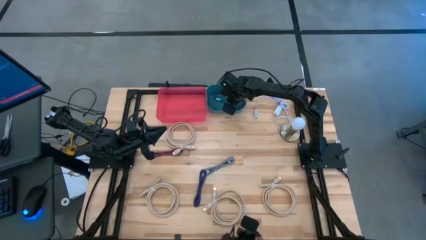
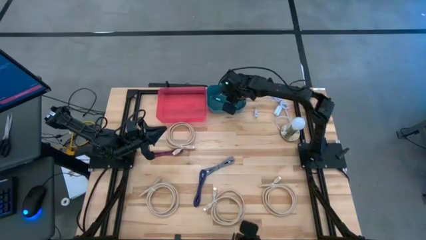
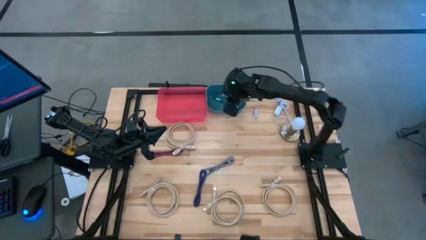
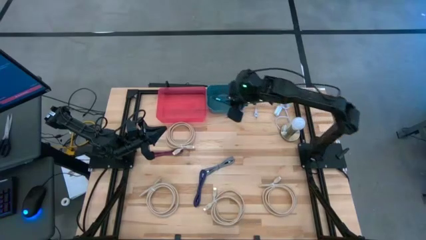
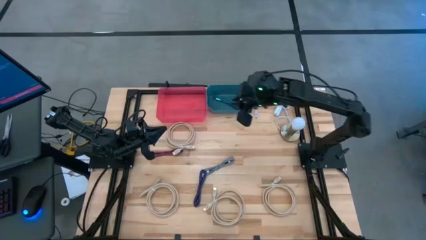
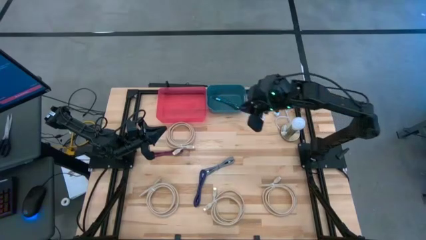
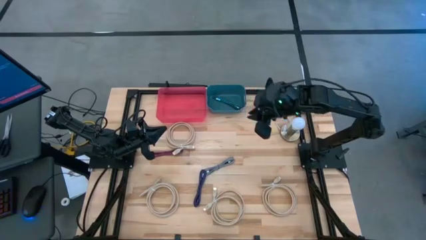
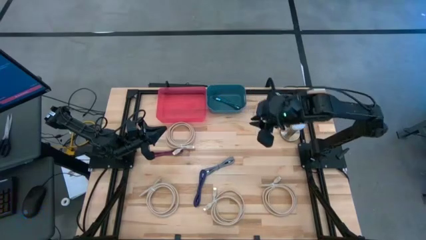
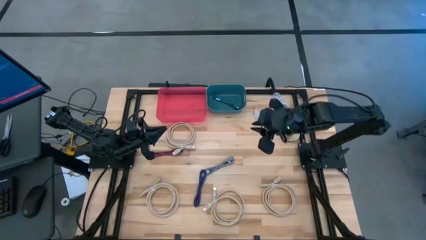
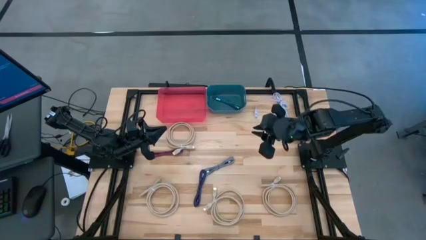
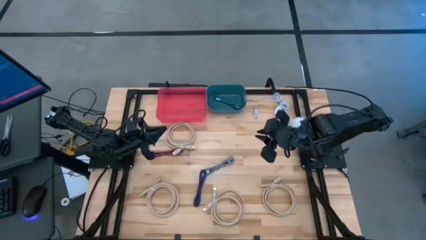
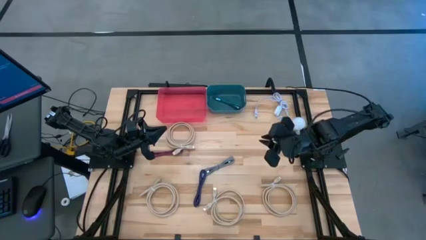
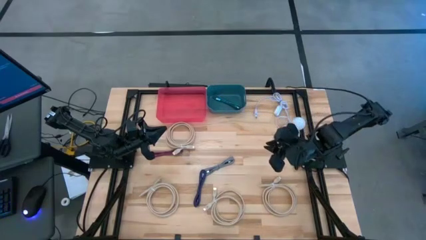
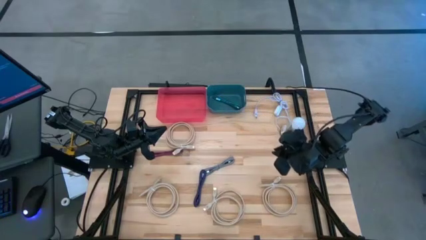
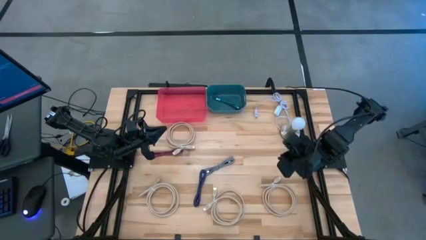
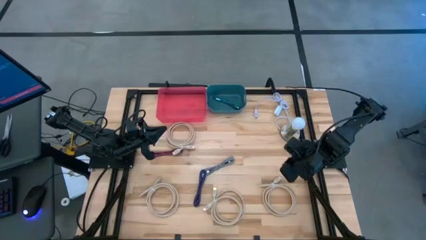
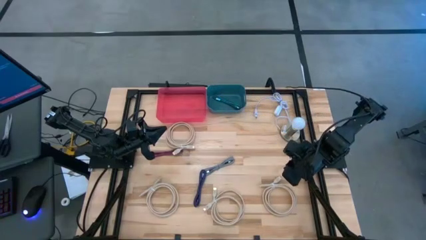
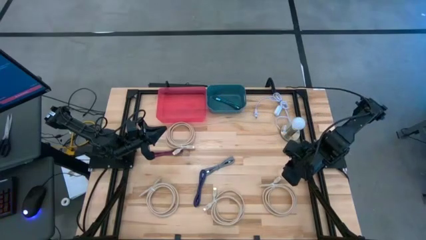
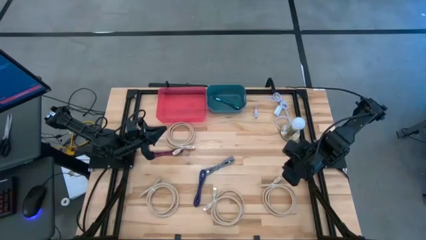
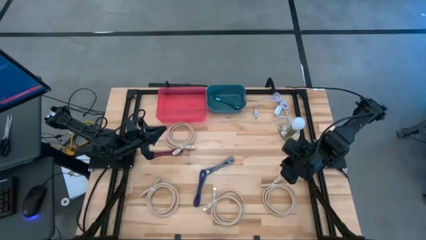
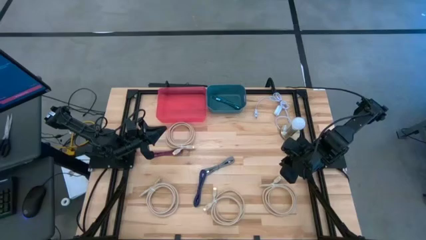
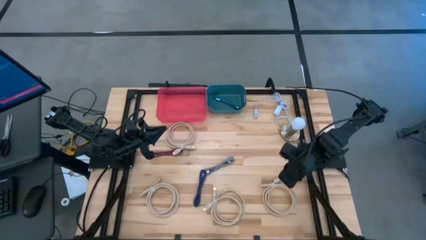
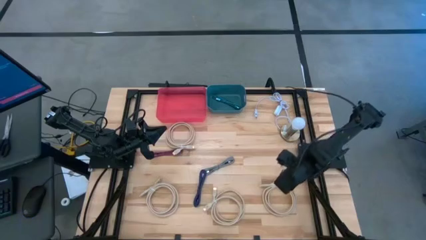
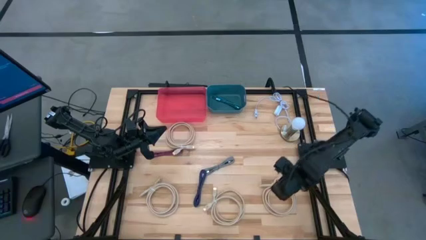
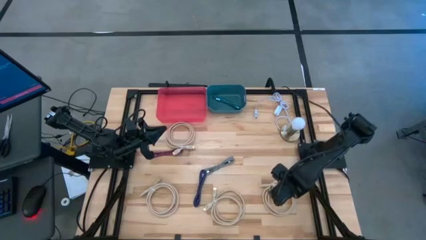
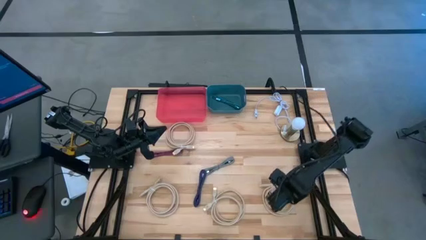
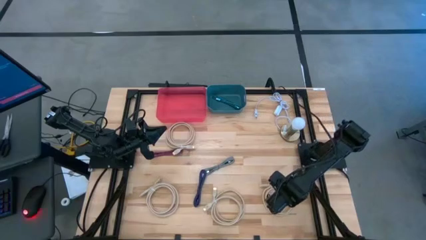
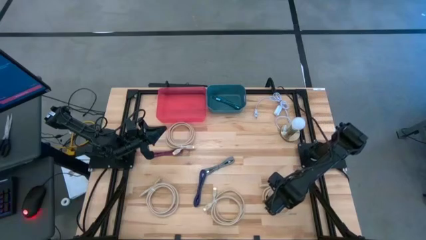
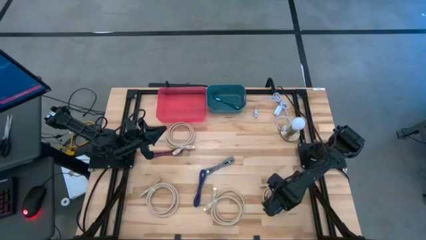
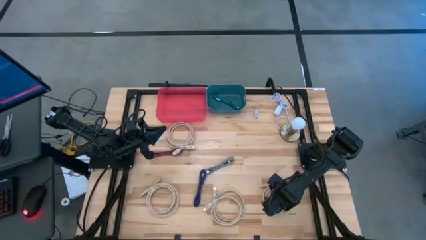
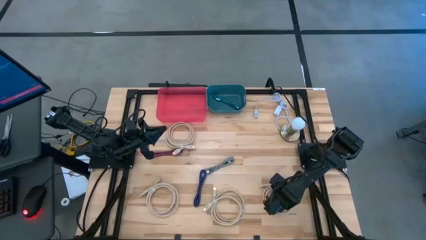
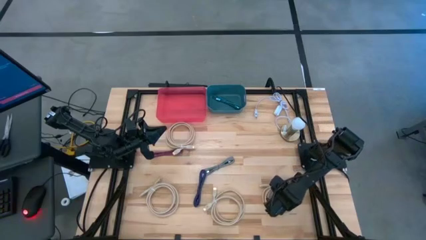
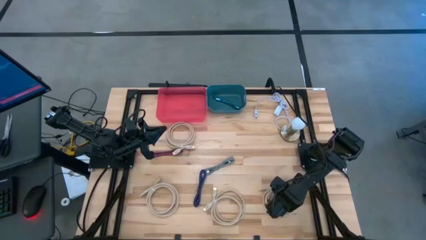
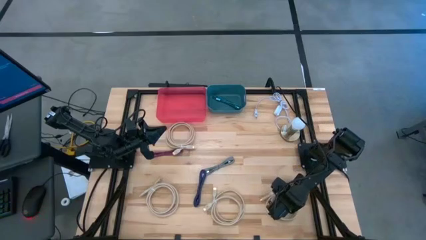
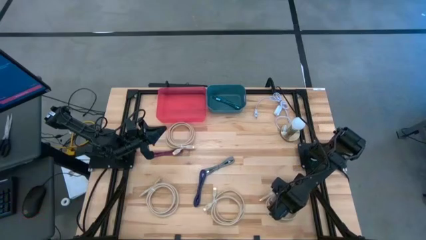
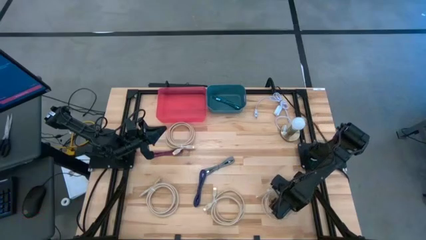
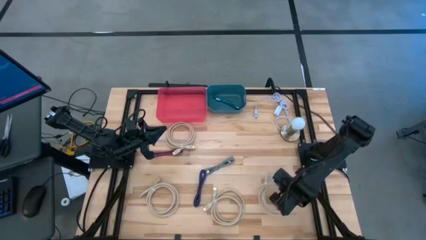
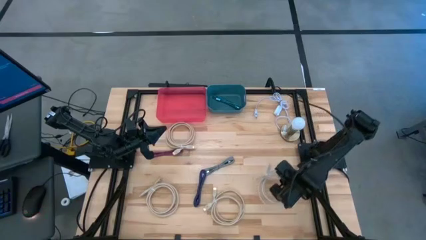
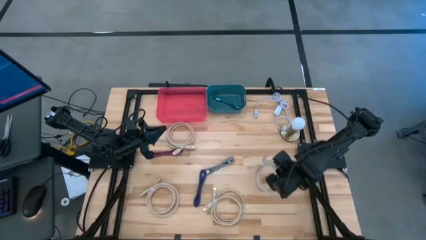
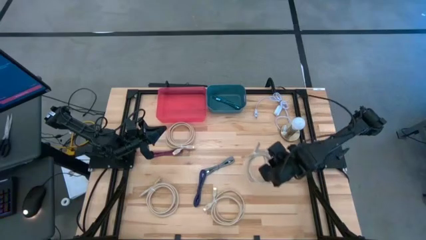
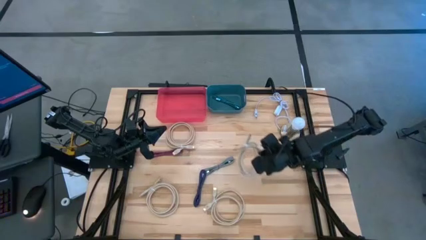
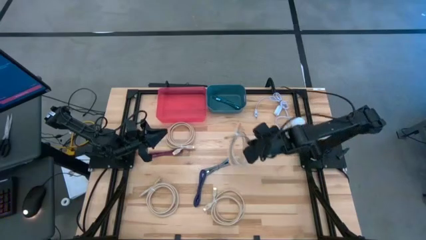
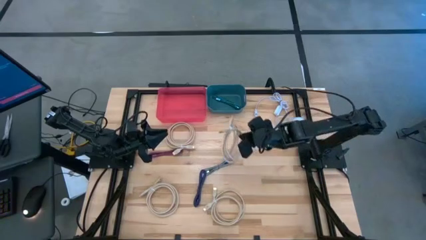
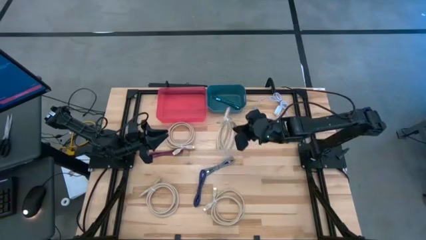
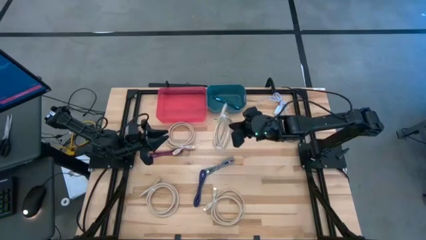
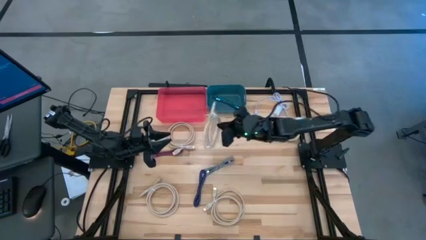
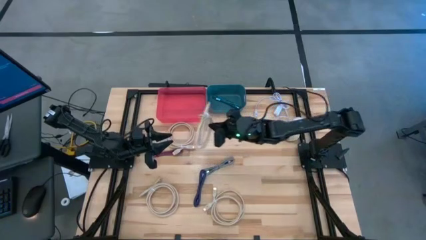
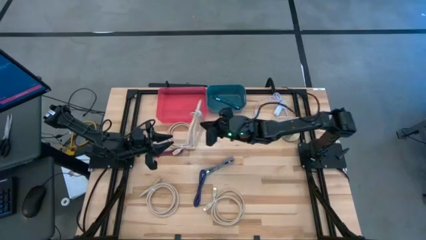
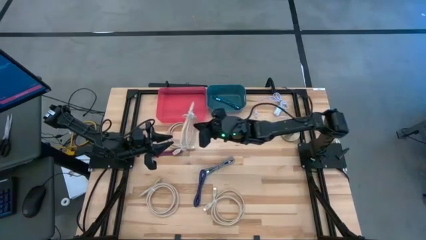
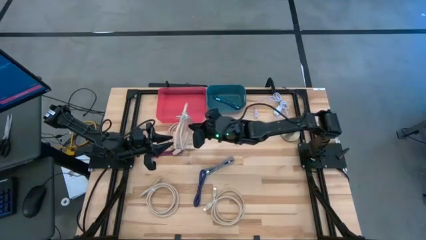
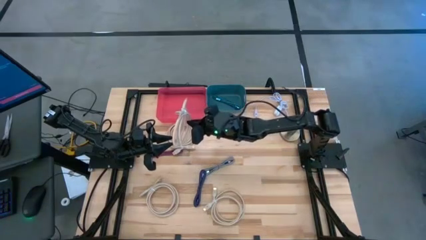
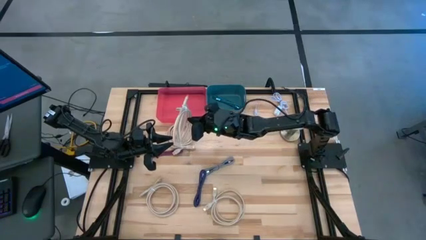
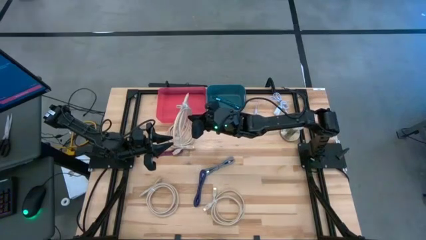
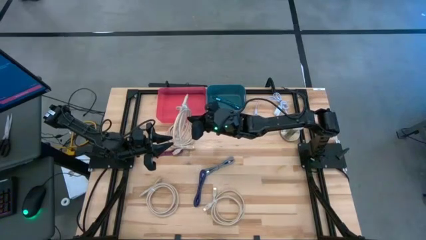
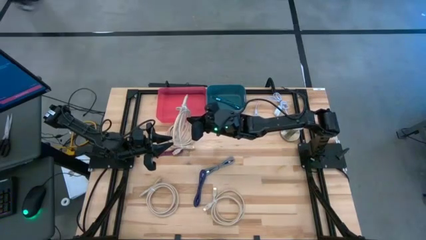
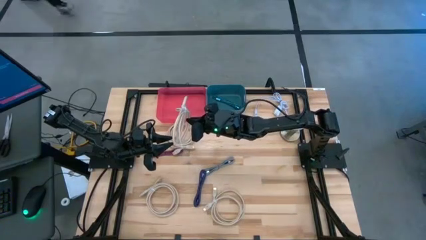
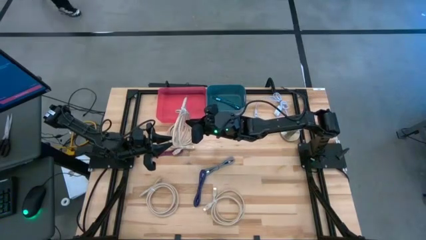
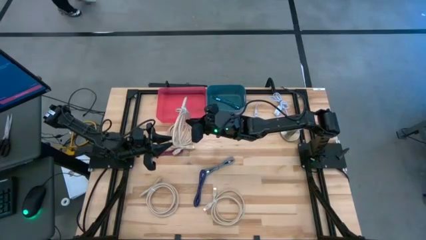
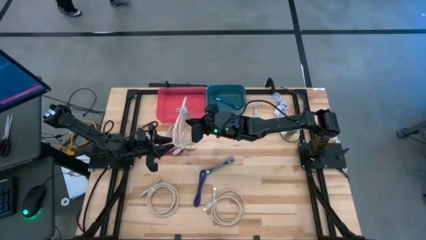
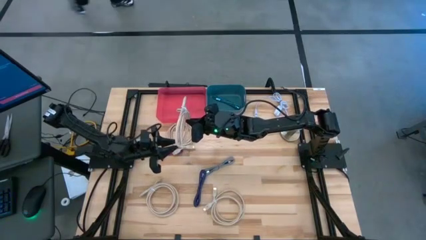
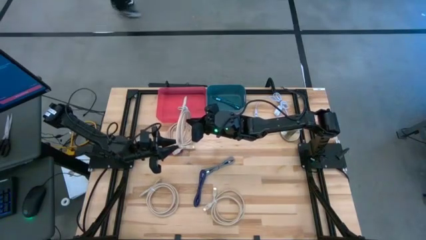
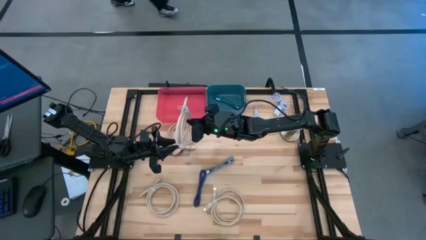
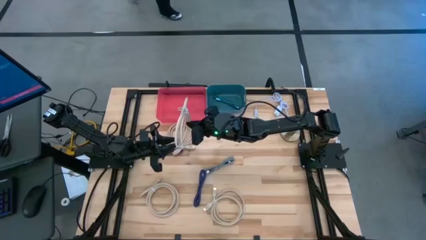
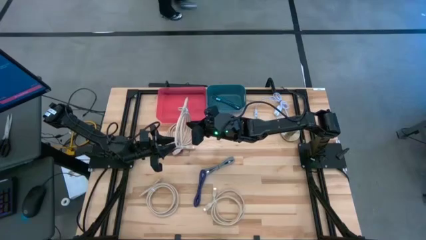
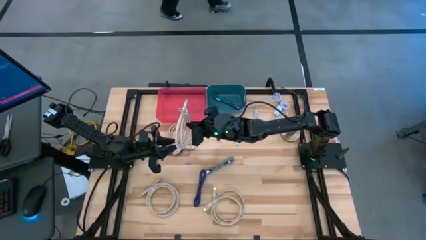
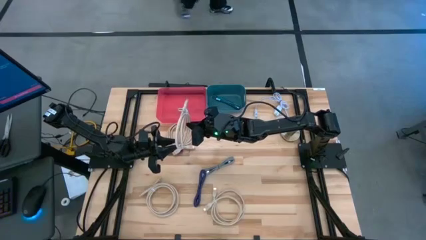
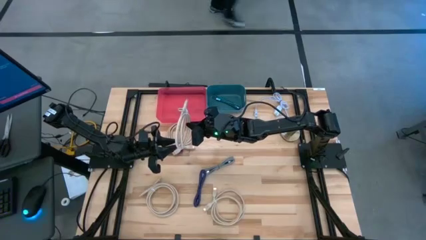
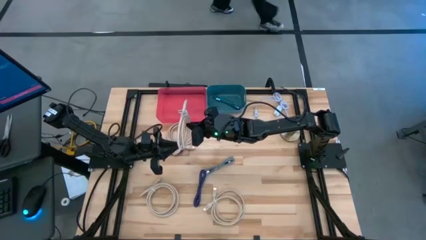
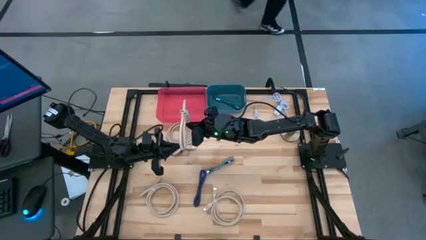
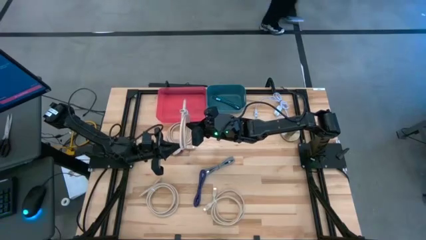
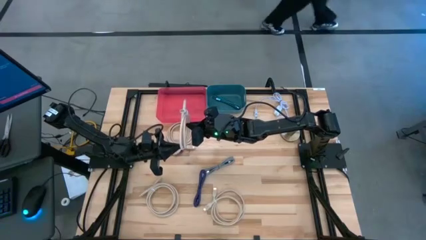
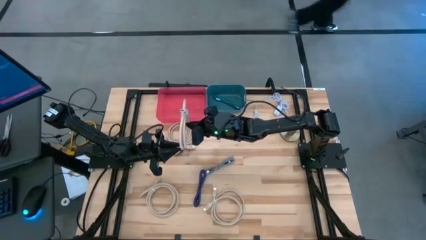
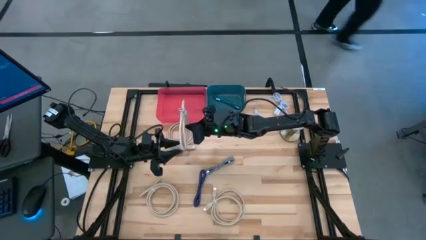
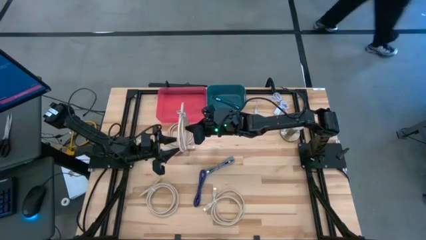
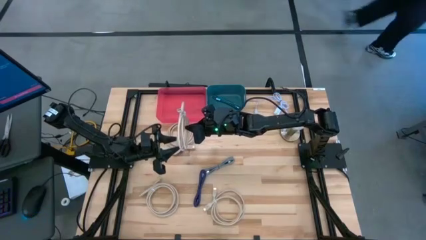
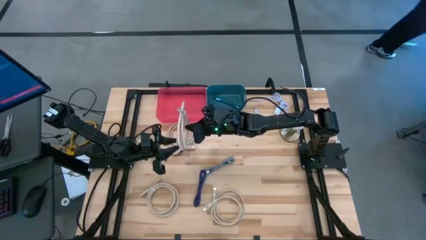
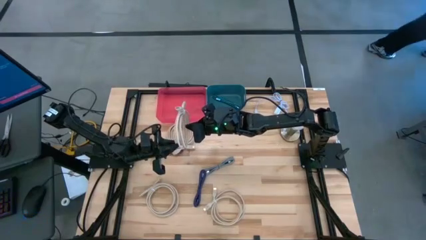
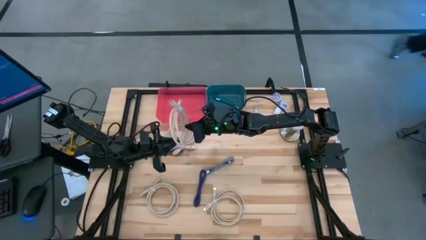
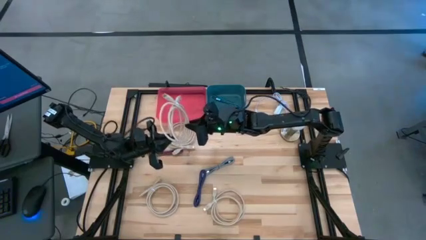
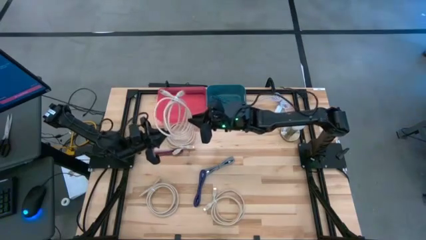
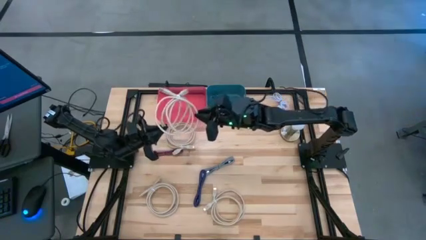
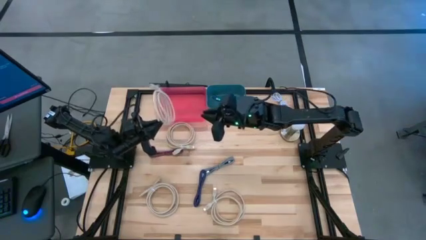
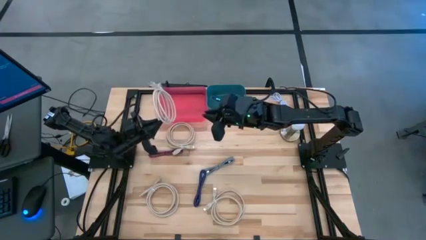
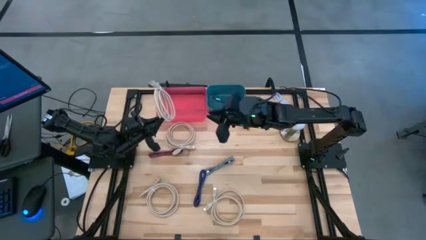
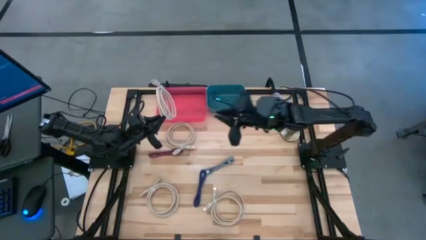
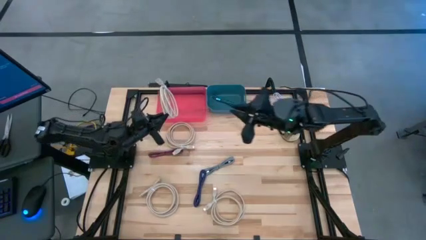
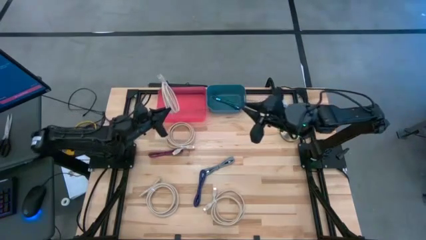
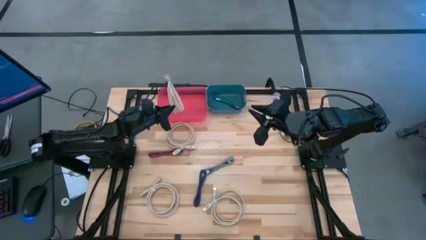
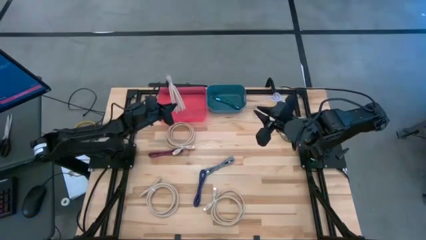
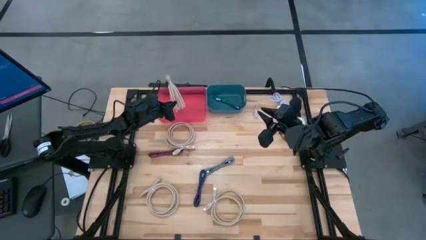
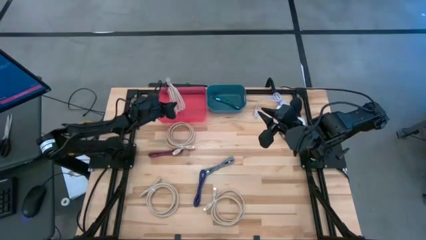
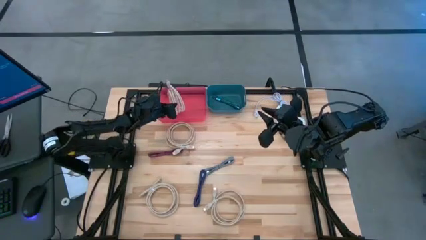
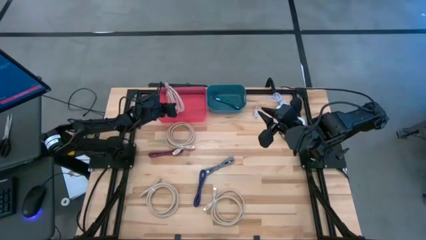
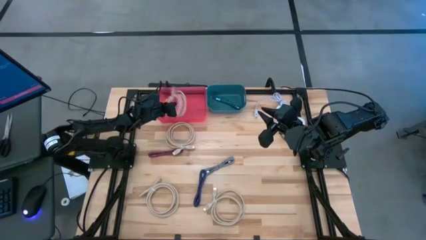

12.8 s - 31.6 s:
Task: Pick & Place USB Port
Put the brown HDMI cable into the red bin
